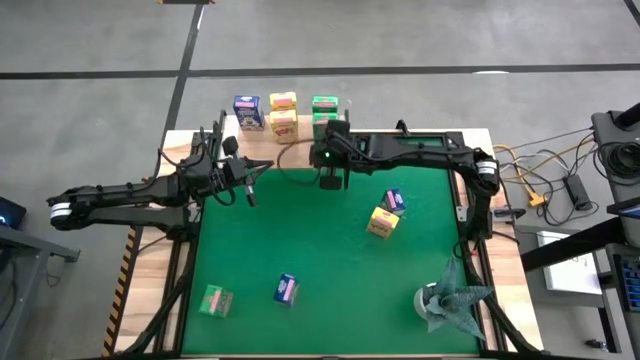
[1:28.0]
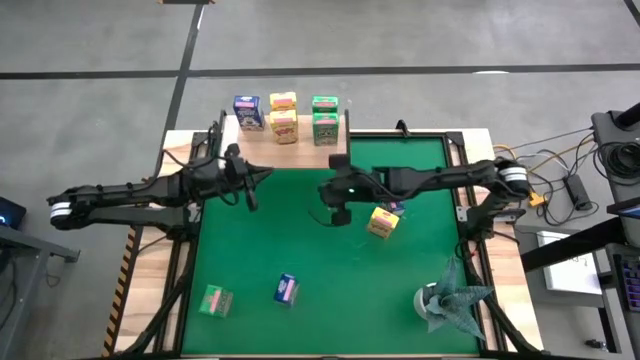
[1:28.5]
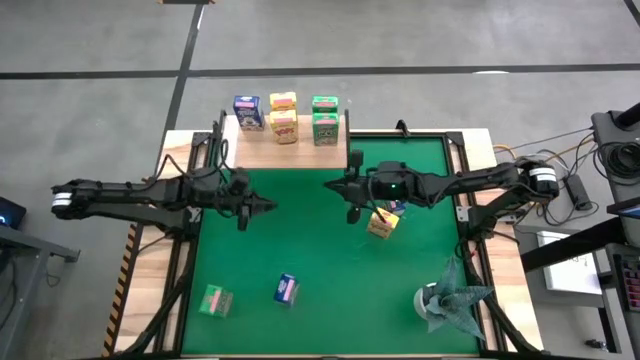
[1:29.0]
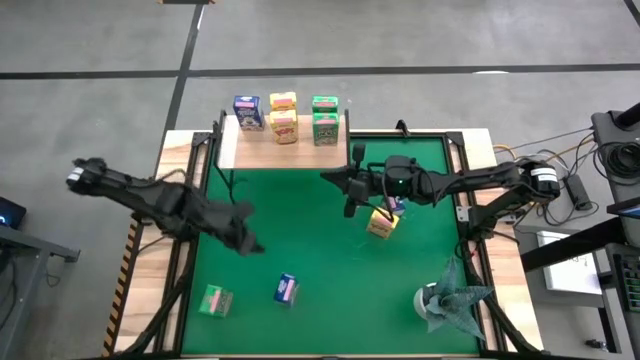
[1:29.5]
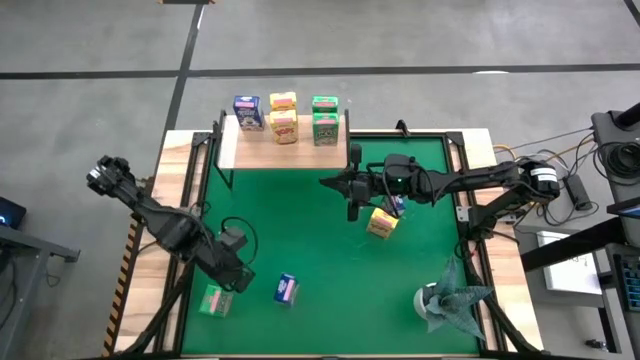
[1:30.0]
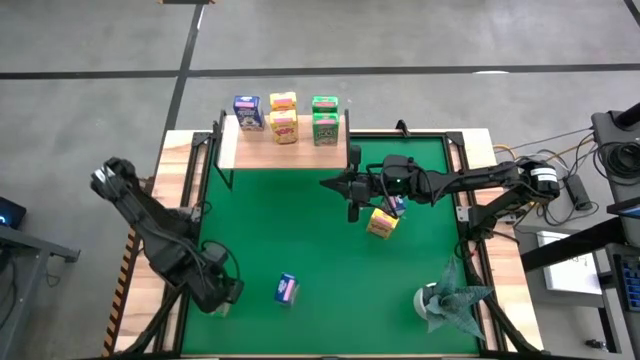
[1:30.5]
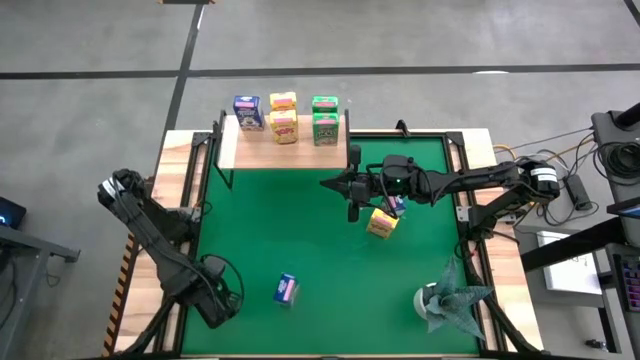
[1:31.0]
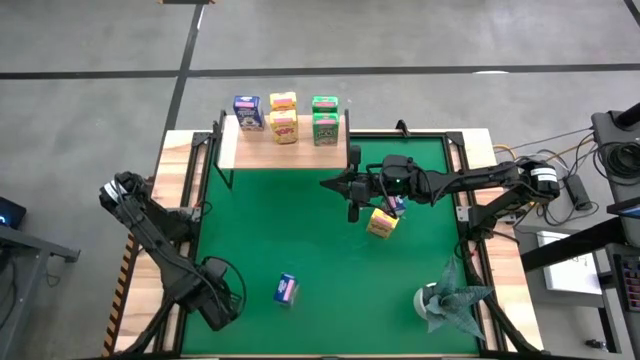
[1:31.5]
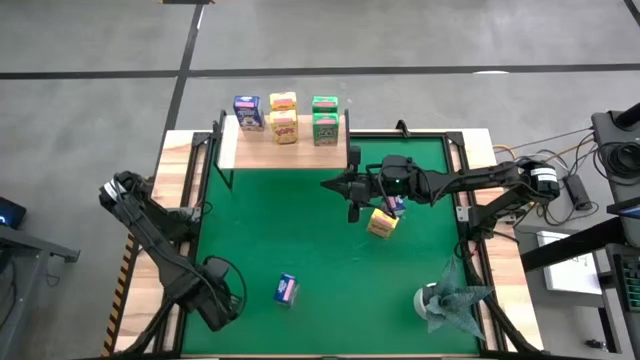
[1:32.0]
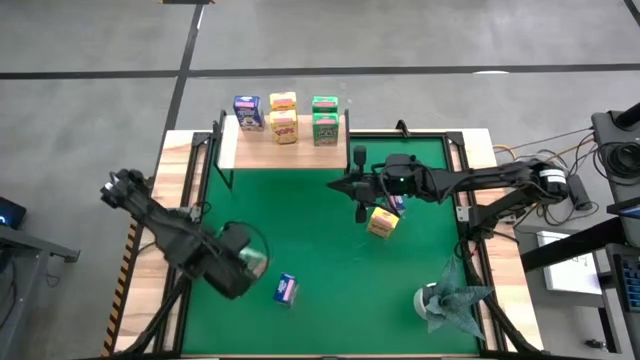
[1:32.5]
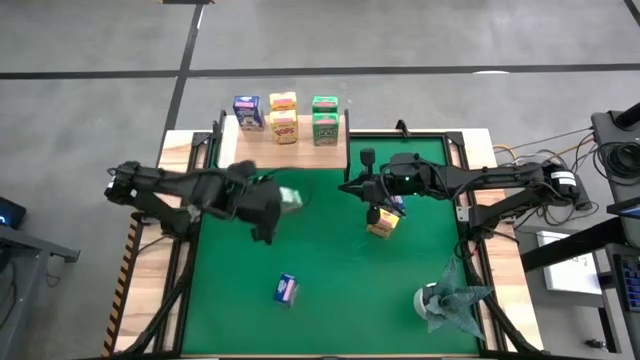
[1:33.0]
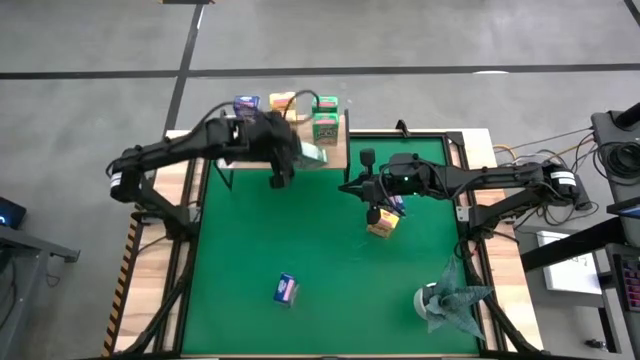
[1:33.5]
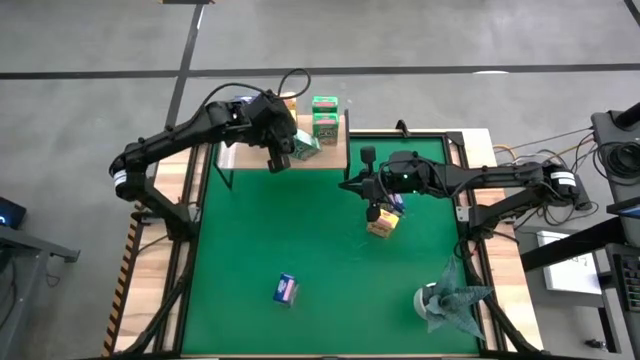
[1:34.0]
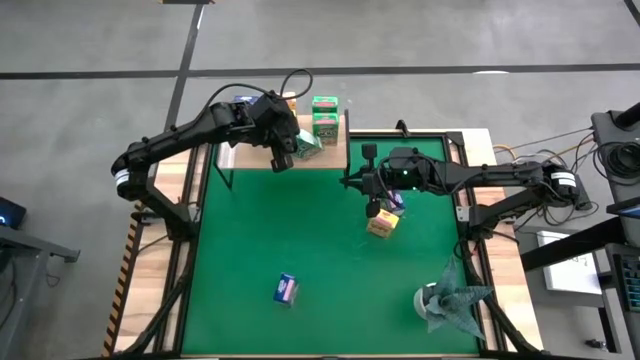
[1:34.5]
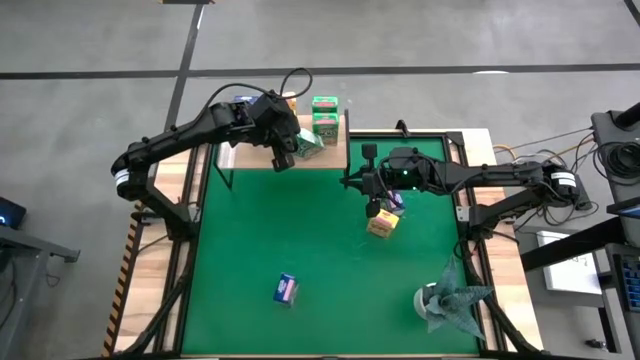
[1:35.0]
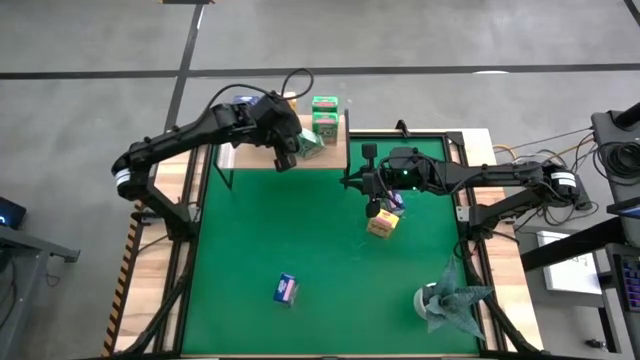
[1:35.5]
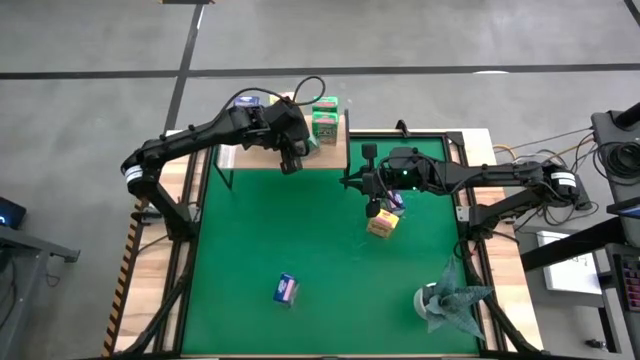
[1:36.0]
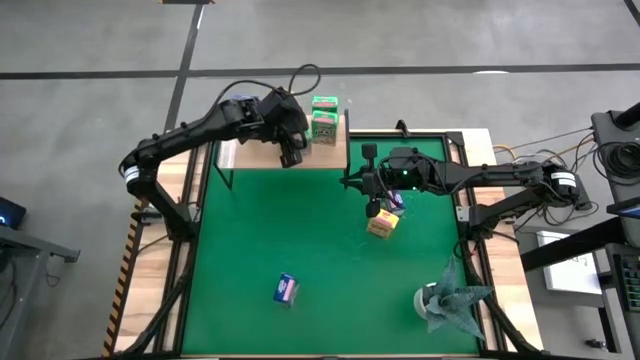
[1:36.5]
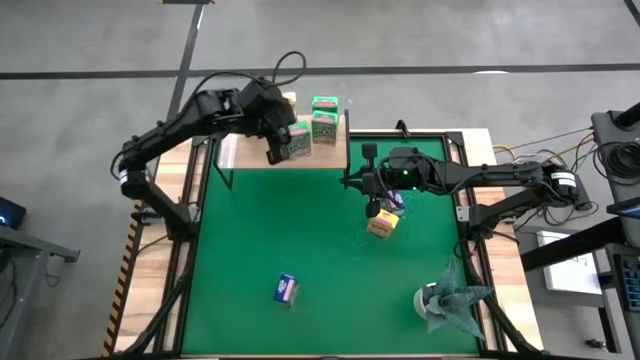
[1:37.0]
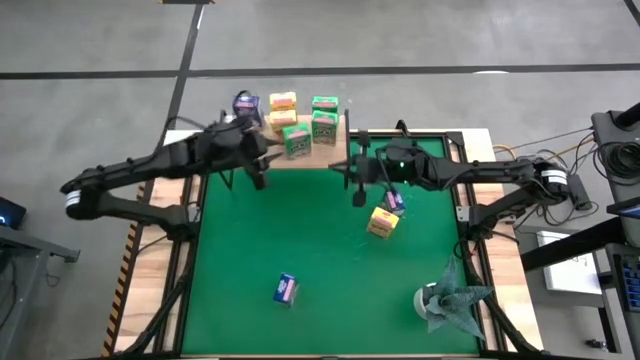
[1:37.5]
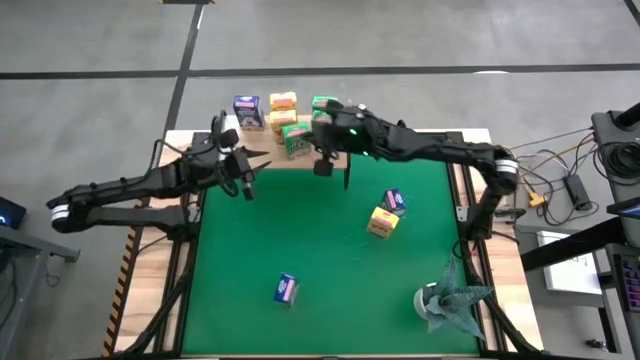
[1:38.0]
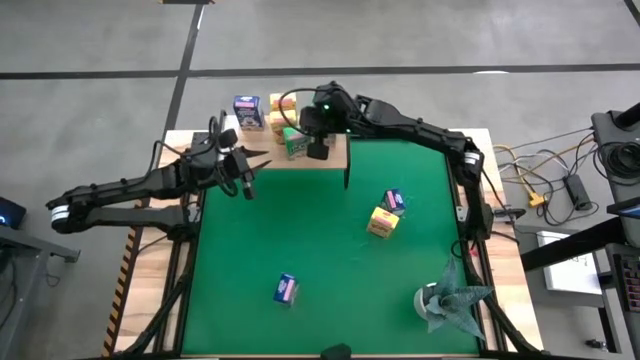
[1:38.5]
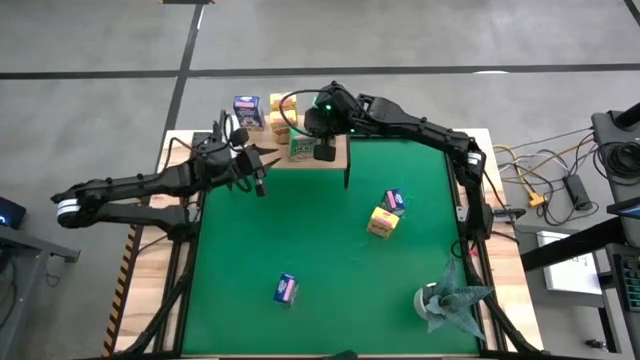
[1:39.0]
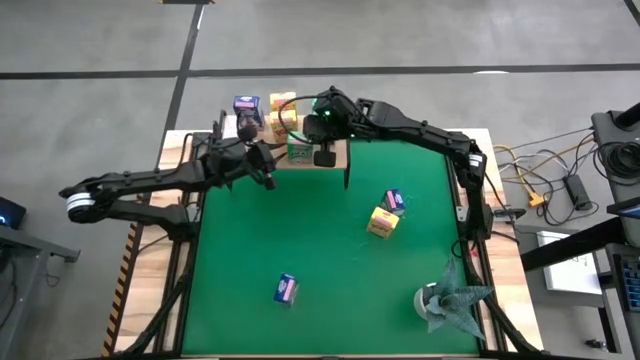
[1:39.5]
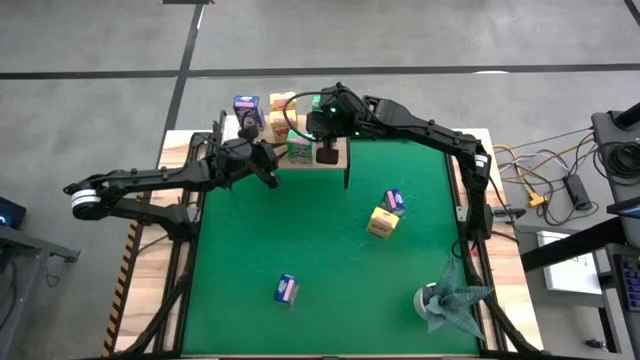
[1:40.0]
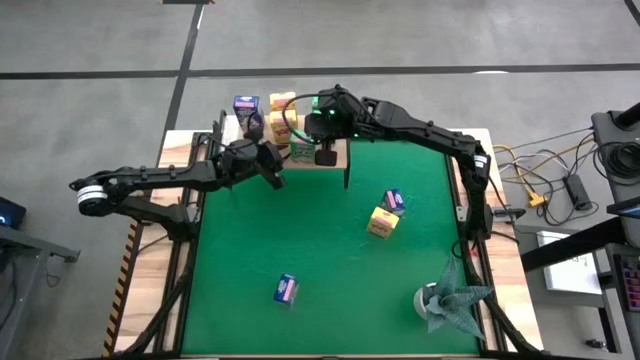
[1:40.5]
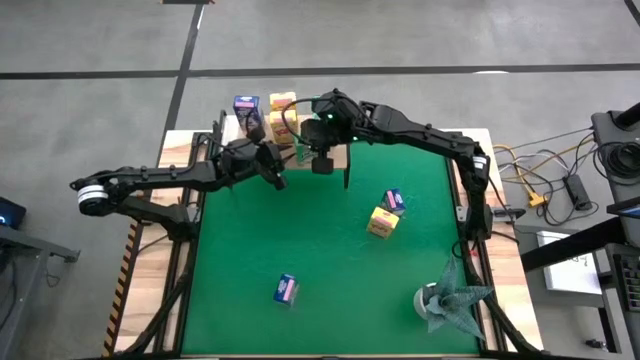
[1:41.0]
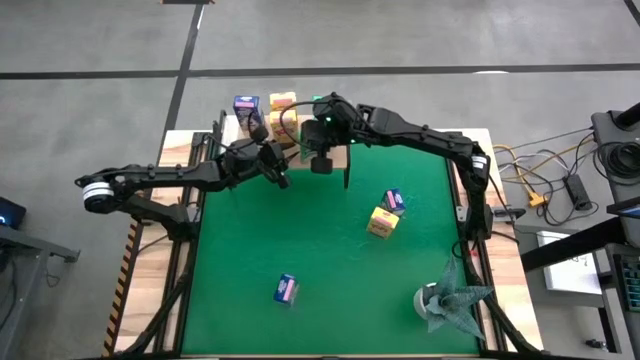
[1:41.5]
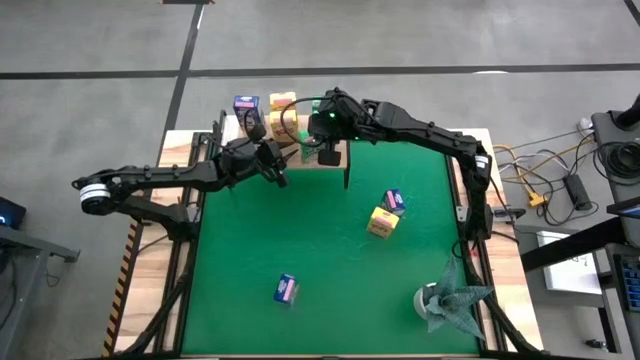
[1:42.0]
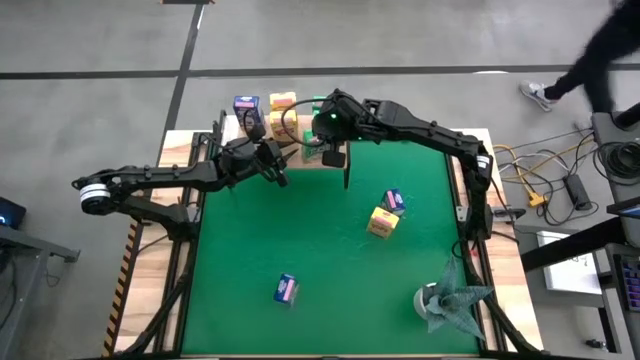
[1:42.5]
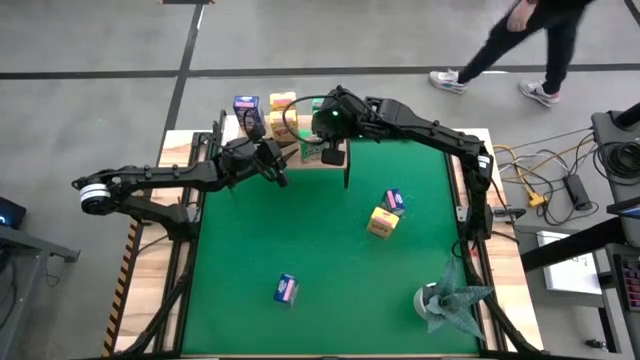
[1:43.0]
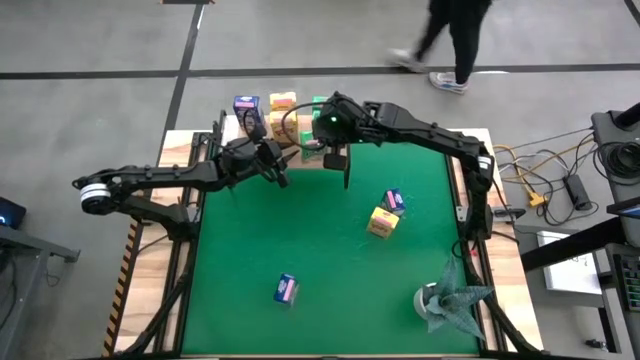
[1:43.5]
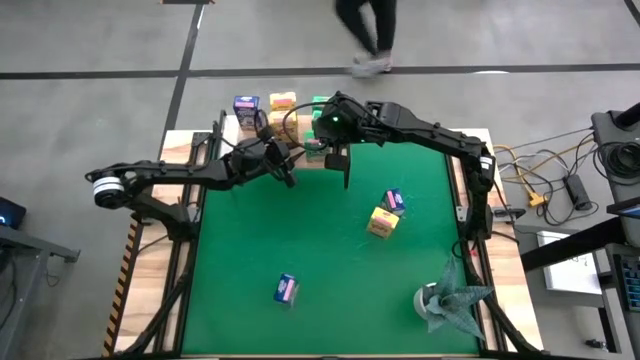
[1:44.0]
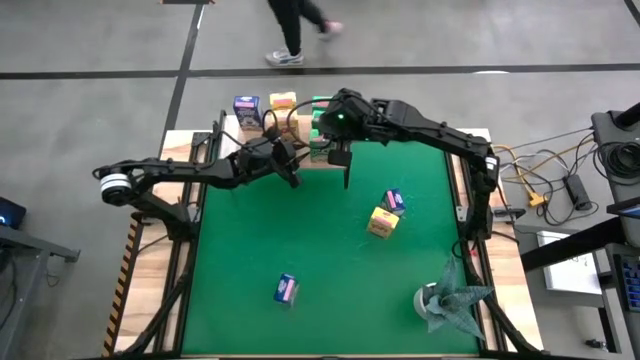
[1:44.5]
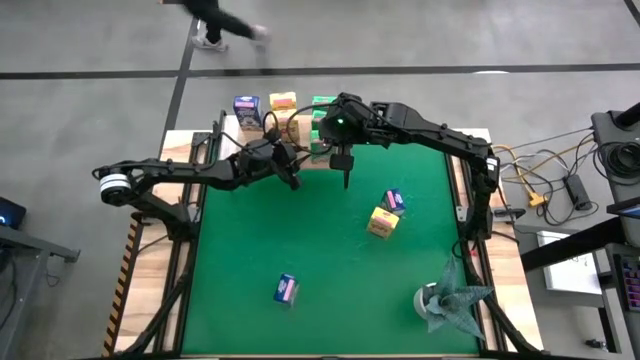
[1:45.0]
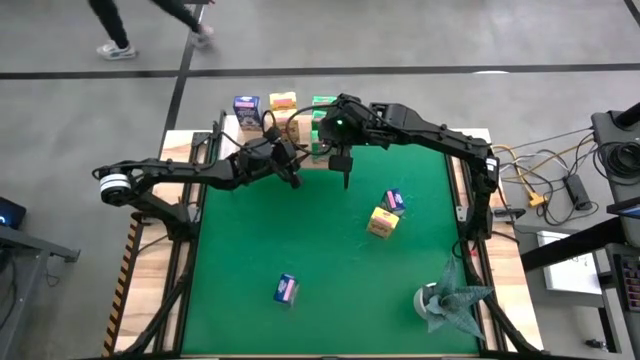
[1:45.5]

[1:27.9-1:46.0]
Task: Stack cereal on shelf
Put the bottom green cereal box on the shelf aligned with the other green cereal box

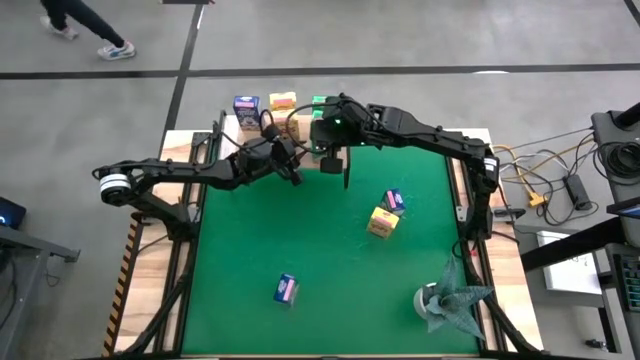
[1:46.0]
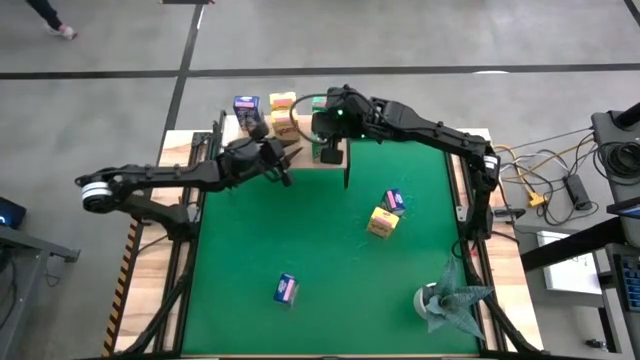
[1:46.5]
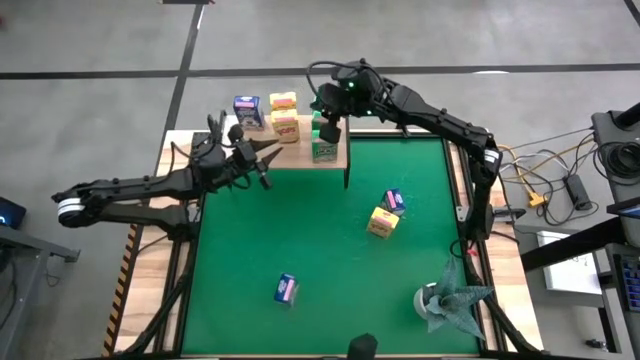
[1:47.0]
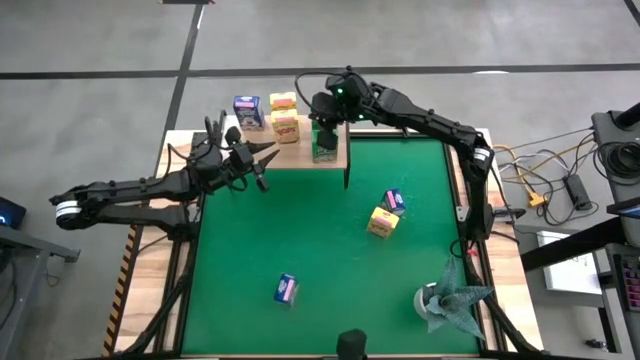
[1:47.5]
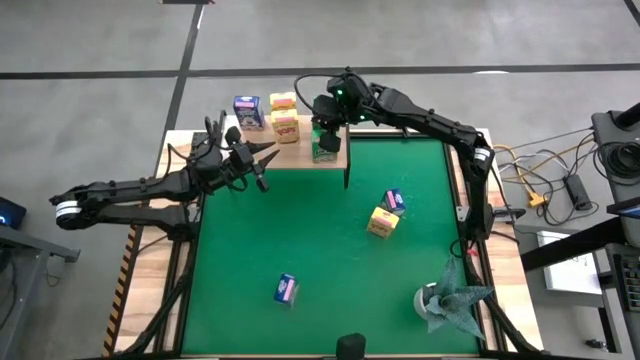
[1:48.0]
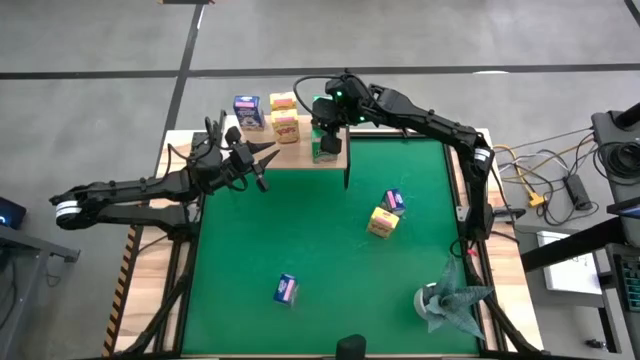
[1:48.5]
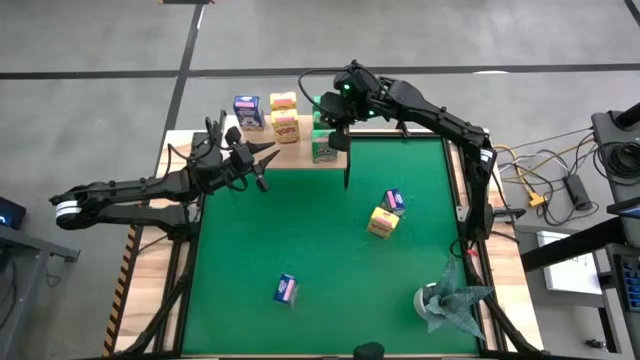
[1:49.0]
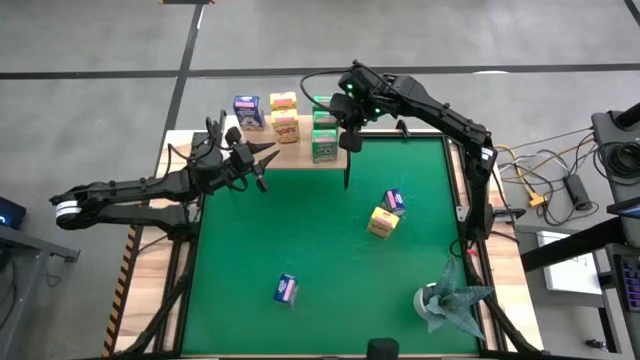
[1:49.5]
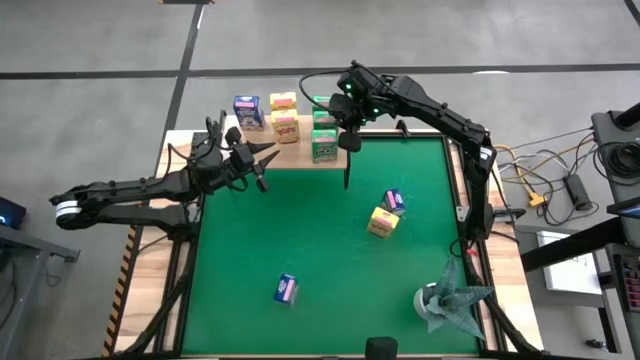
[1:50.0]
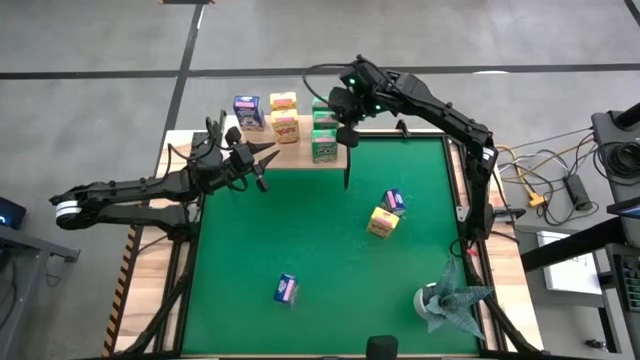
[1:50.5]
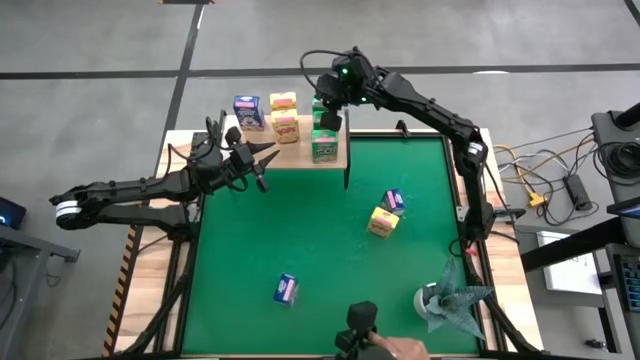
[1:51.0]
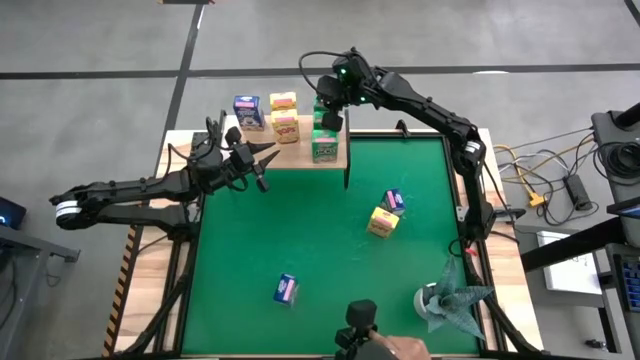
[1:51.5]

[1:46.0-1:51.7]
Adjust the green cereal boxes on the shelf
